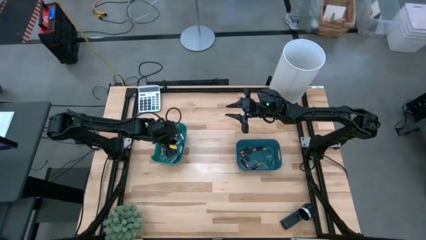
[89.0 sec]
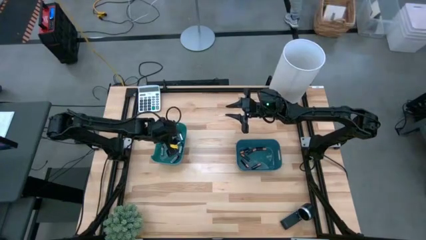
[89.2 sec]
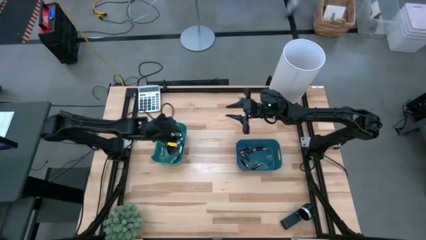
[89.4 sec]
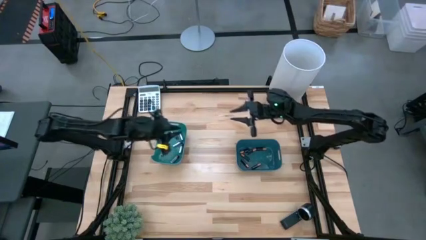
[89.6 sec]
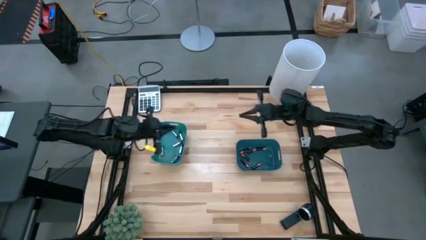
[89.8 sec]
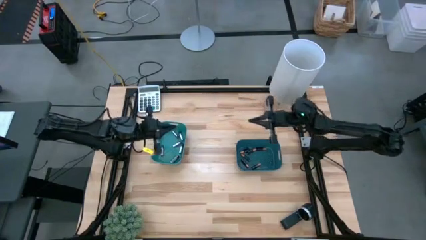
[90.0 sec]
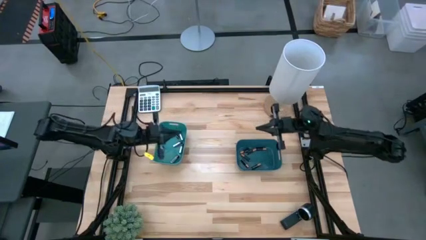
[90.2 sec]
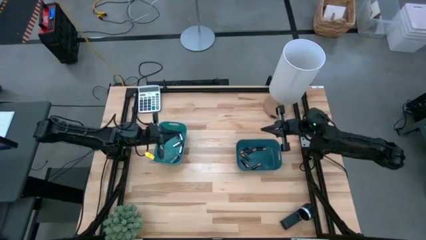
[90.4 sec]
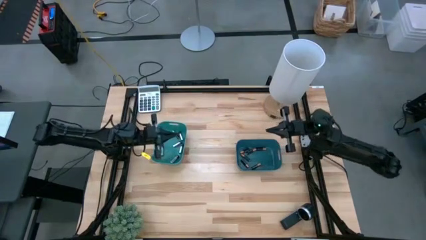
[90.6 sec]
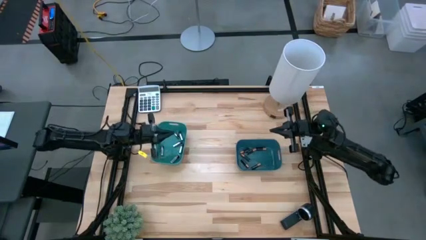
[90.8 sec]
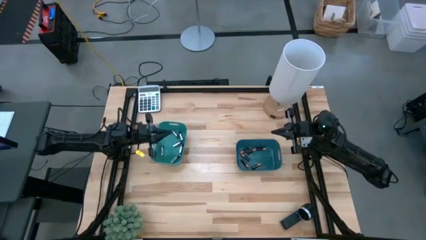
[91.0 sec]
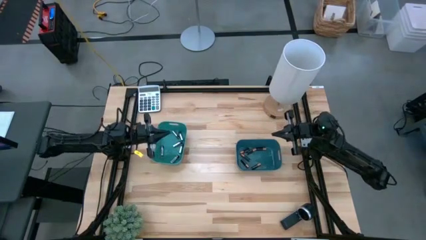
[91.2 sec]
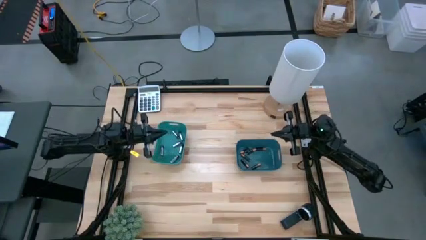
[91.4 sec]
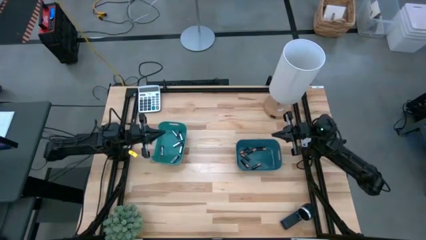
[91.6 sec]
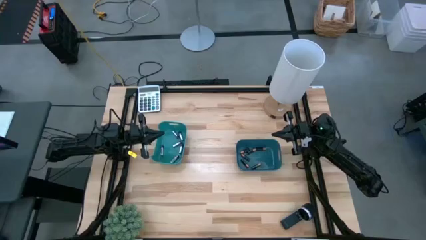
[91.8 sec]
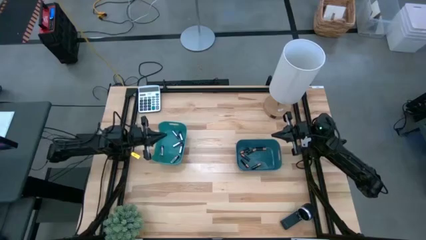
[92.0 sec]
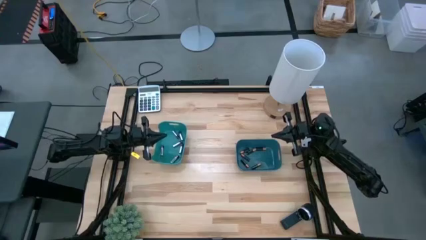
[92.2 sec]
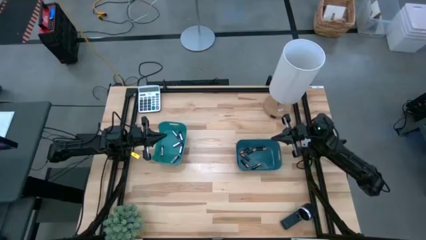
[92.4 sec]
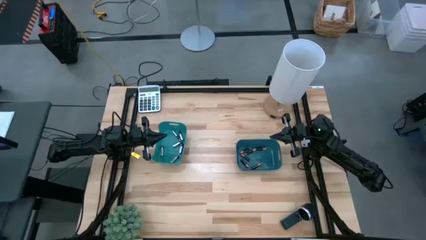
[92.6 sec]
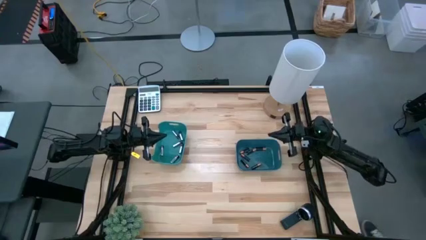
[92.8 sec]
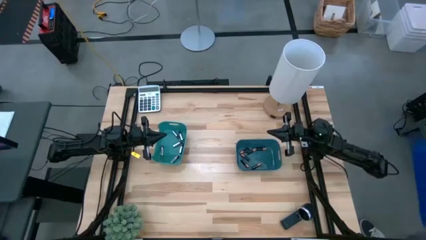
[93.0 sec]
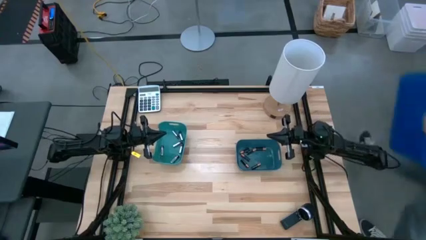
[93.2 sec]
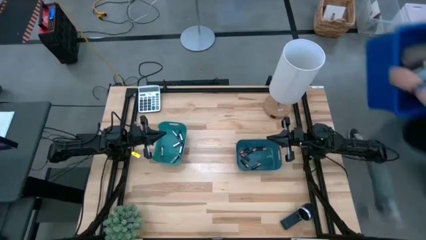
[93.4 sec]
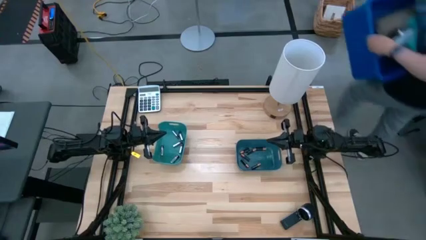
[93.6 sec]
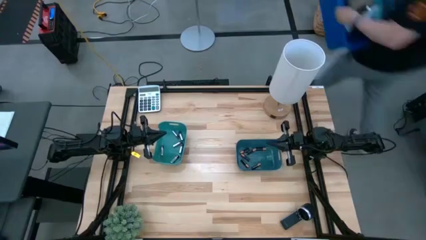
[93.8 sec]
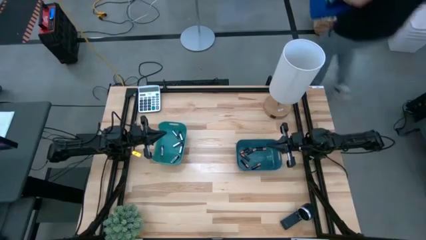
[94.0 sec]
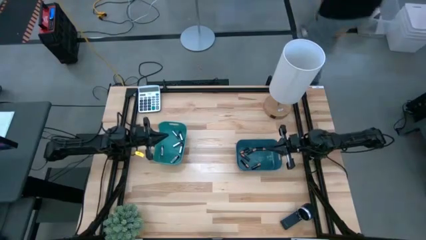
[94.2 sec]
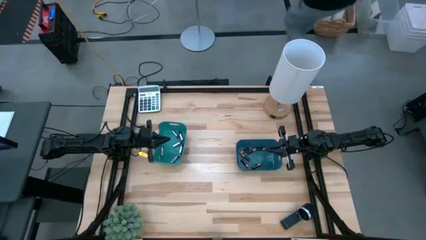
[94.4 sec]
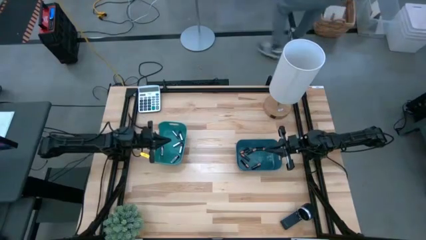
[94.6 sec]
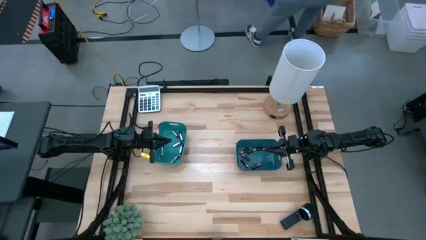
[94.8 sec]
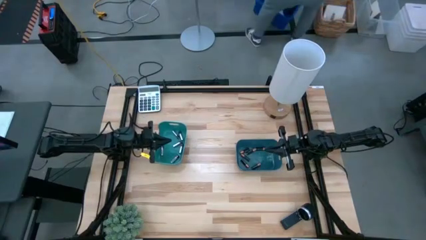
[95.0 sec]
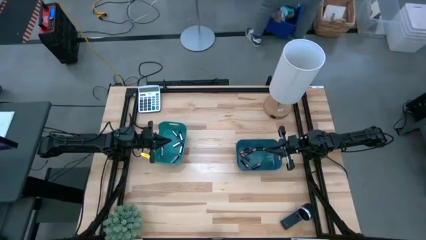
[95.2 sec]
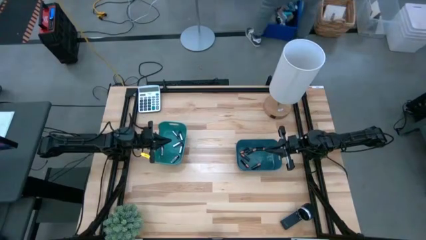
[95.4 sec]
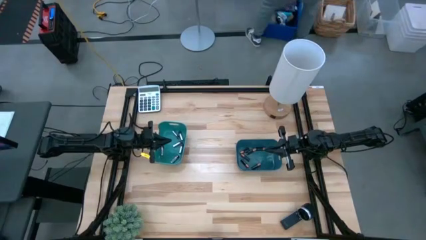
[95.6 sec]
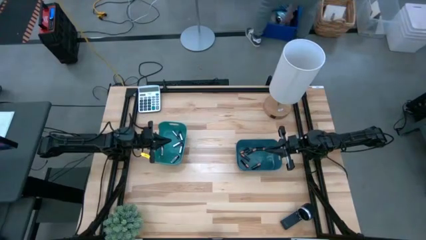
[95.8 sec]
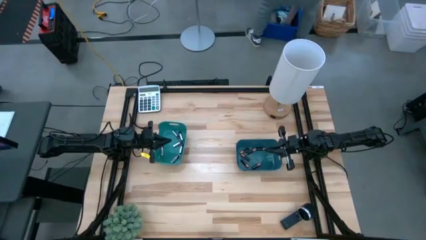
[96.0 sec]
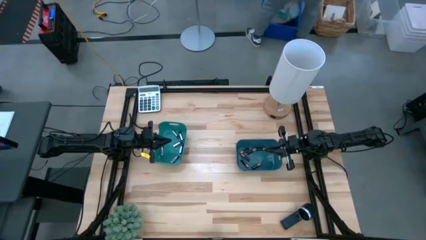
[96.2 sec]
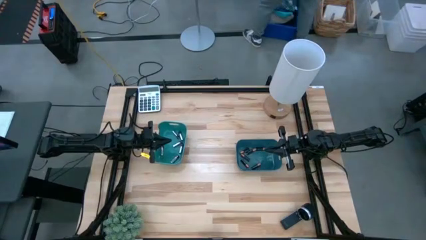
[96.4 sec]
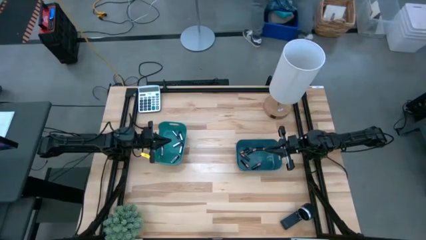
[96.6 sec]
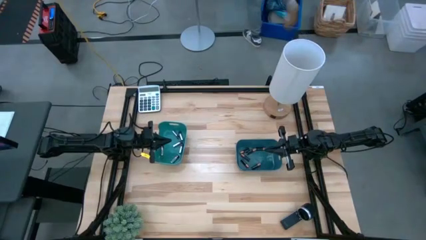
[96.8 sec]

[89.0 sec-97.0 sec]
Task: Sort batteries
Return to Home Position

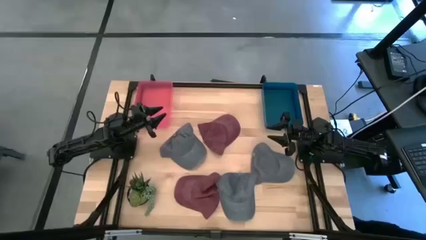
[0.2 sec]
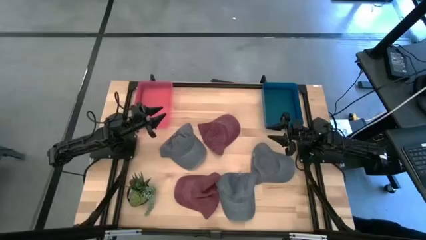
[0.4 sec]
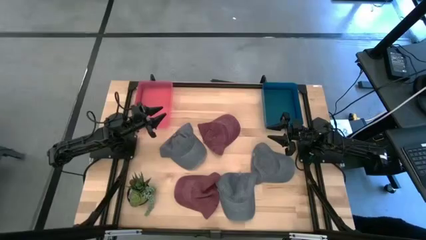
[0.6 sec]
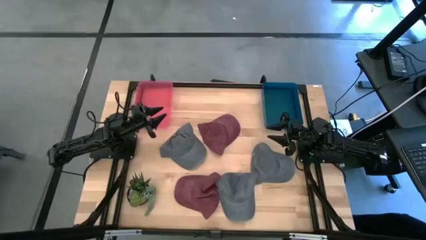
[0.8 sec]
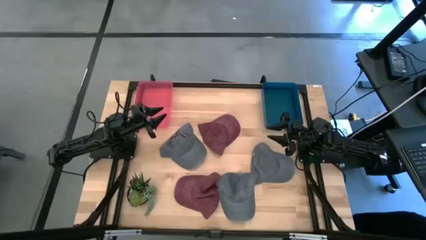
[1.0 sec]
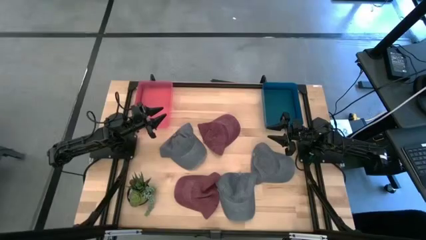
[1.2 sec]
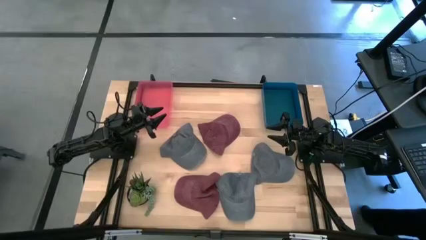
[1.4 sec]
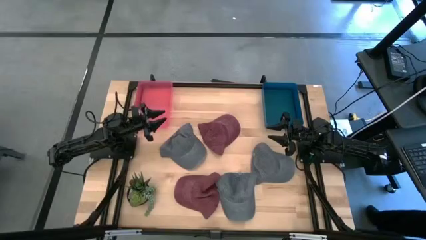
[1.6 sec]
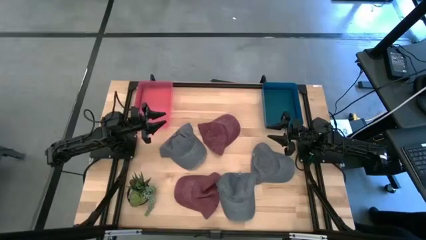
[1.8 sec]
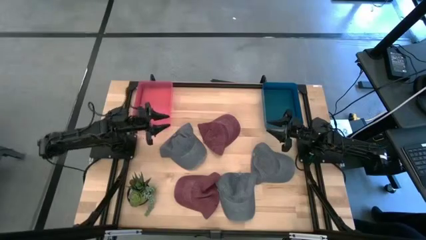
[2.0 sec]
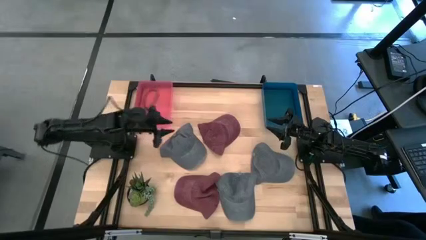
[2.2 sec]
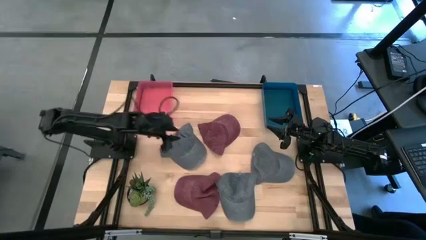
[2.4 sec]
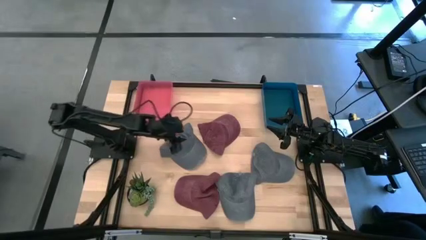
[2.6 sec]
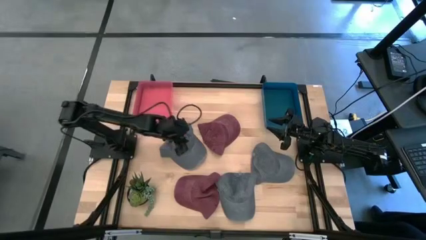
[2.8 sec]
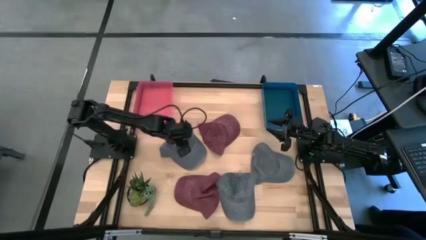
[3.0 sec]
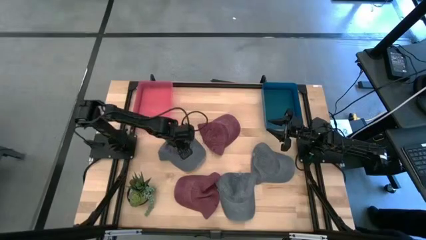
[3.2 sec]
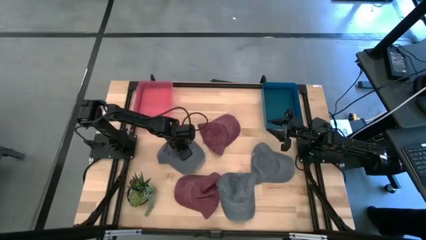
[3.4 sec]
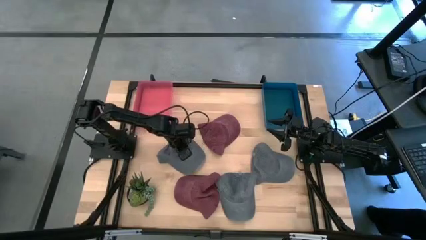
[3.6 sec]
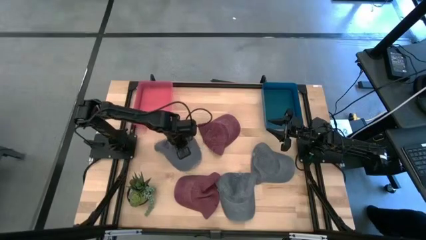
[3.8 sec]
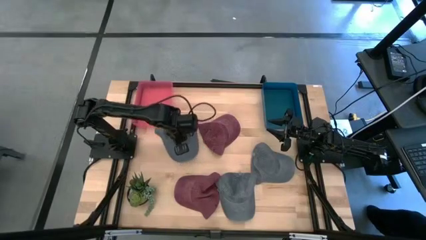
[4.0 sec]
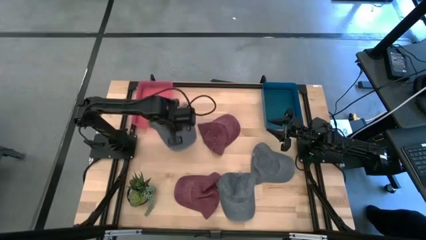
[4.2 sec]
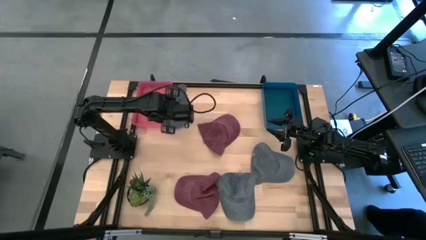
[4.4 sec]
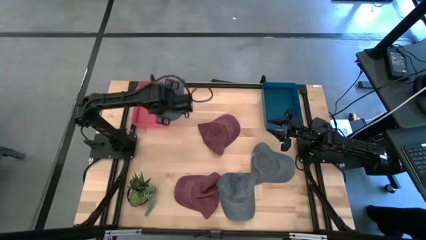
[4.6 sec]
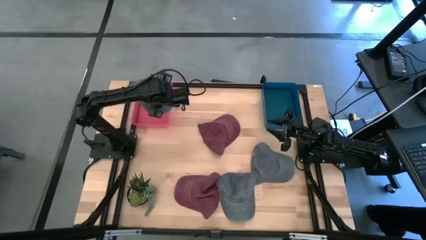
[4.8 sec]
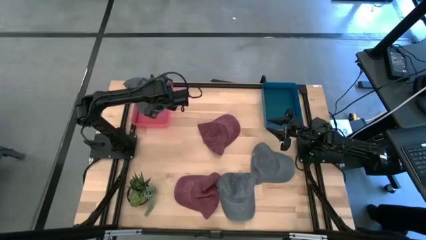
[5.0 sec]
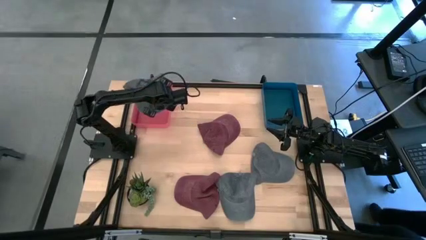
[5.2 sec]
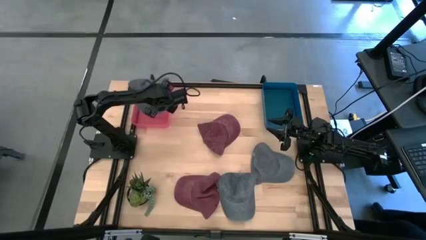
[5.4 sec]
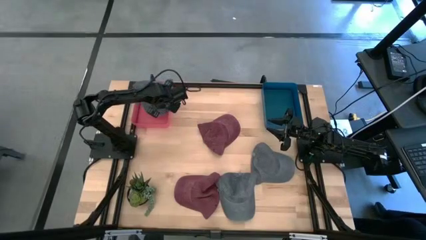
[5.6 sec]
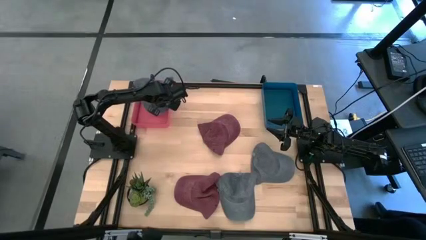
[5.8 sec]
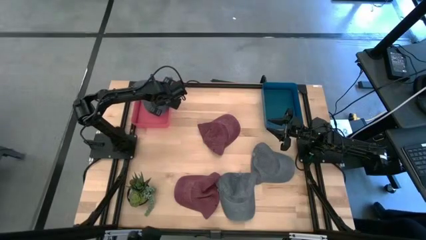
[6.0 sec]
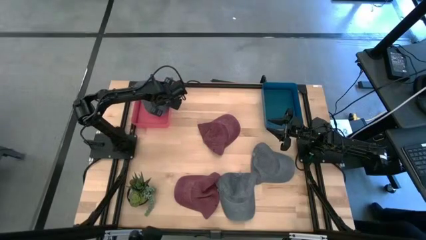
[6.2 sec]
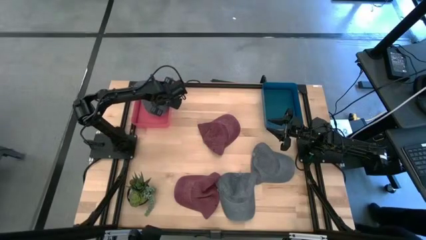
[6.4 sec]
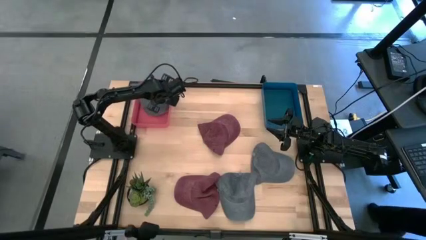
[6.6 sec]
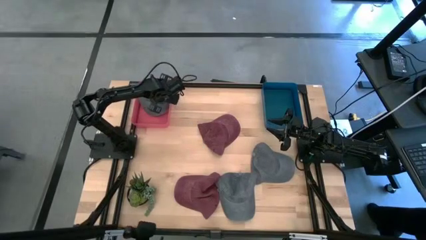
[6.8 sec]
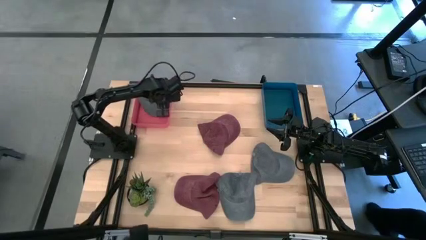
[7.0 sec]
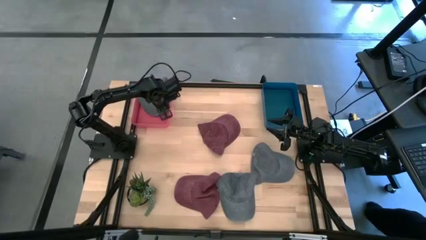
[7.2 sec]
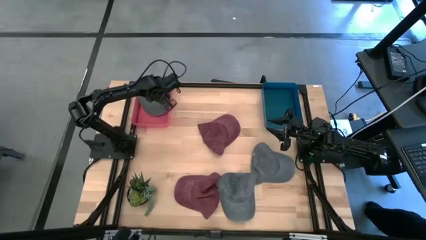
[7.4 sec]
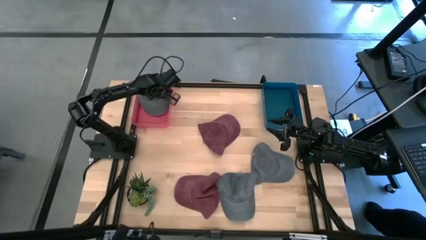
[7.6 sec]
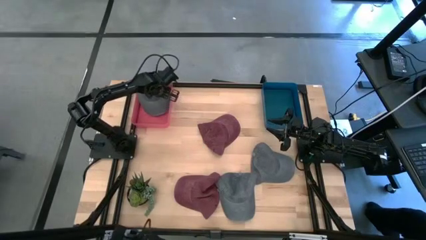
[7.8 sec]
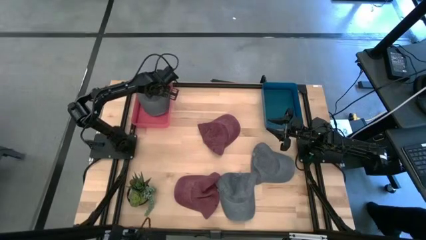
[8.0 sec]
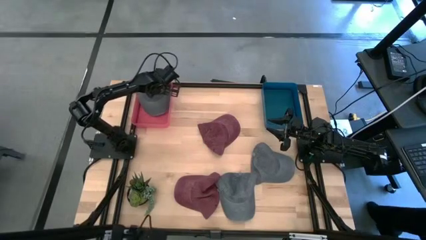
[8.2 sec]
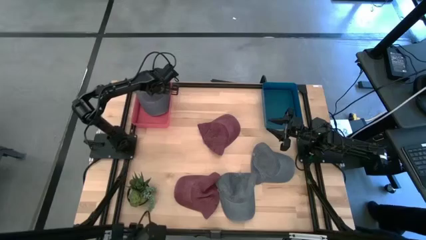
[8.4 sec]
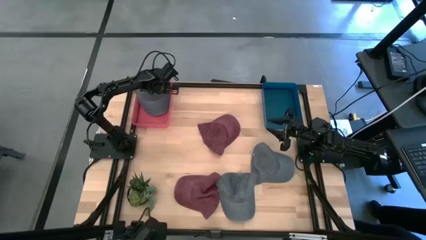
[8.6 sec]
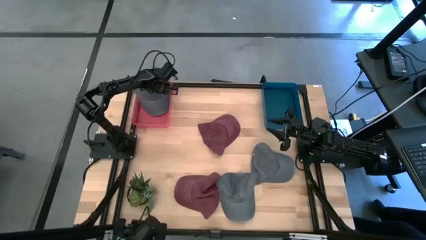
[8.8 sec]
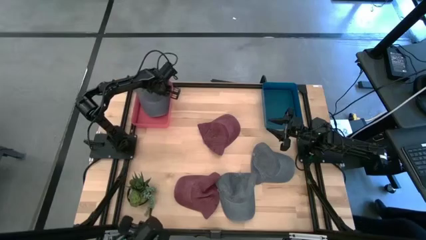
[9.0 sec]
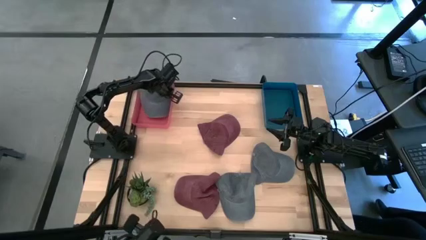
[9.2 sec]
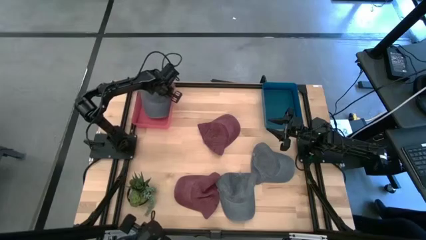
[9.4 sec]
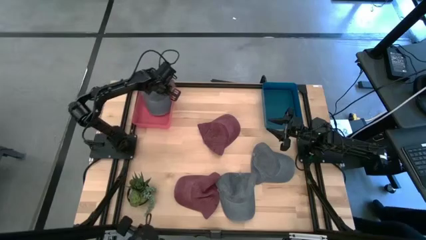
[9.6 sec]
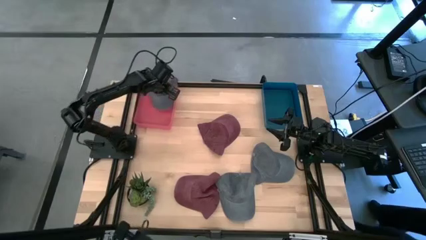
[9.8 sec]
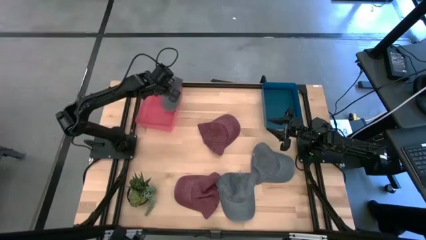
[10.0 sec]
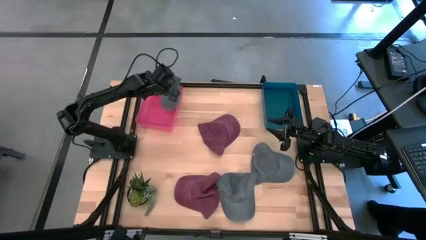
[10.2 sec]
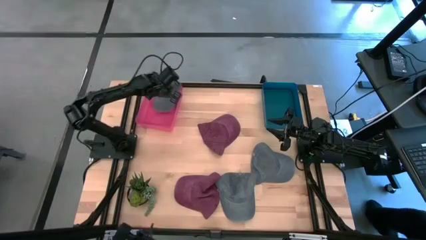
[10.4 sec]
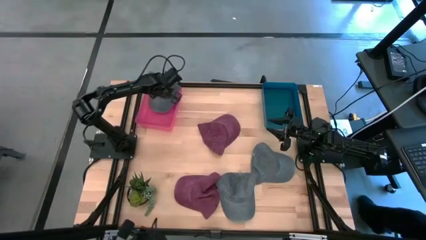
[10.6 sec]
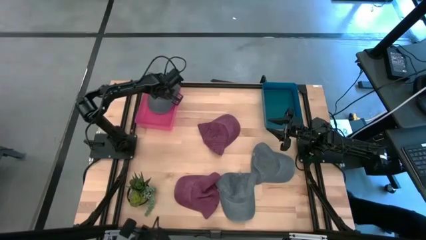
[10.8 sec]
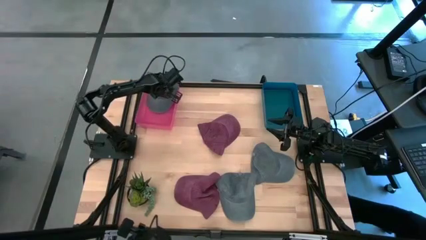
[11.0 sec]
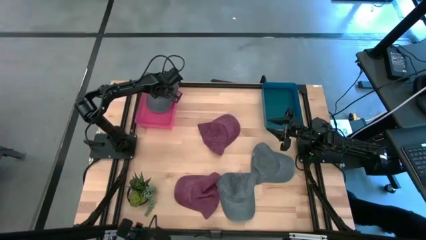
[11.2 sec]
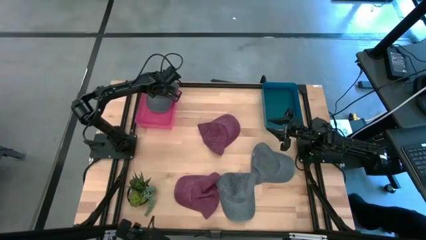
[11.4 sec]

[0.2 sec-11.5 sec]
Task: Pick & Place hat
Put the top left gray cap into the pink bin
